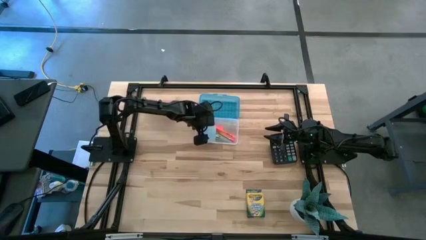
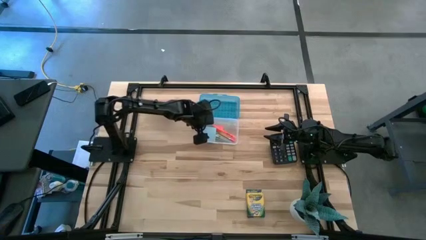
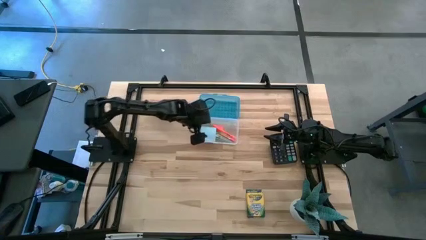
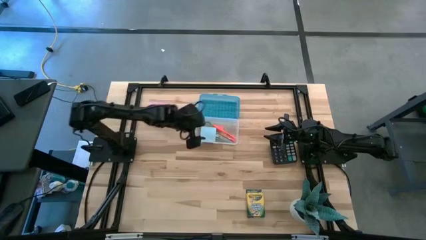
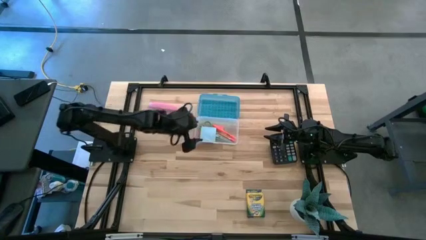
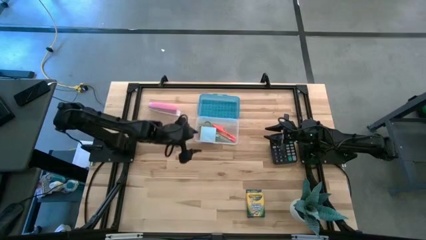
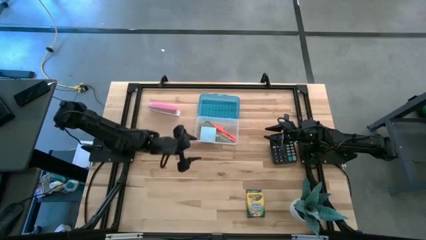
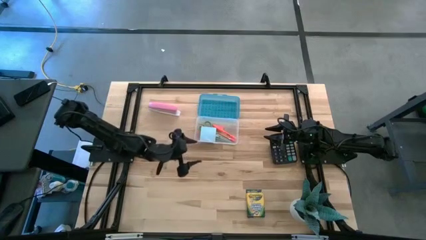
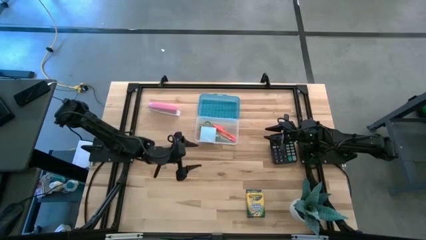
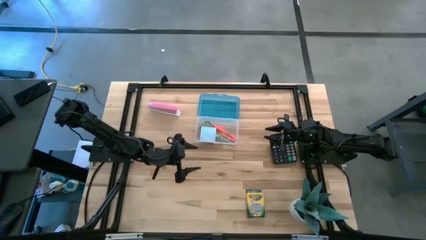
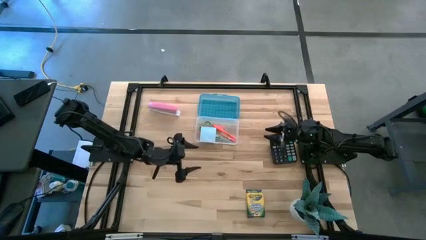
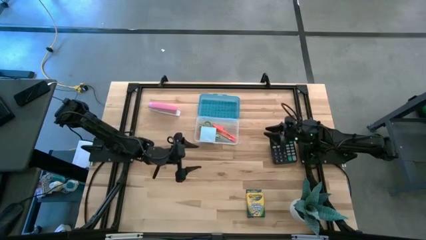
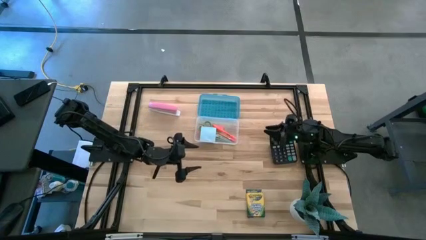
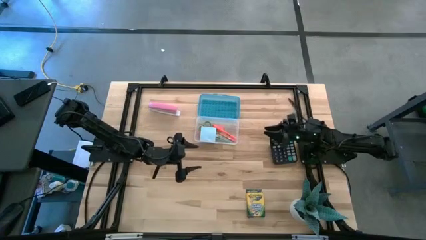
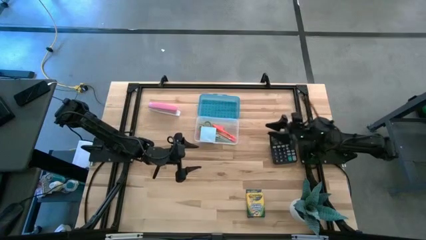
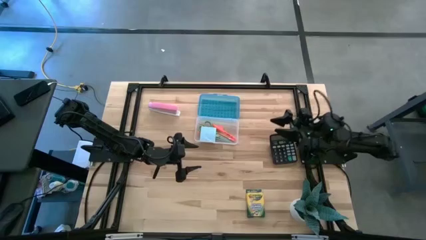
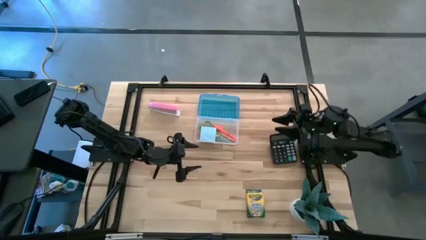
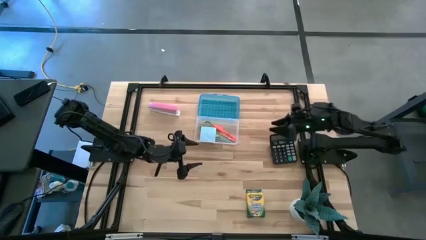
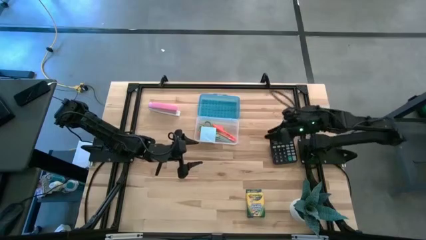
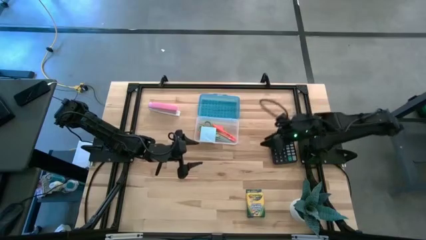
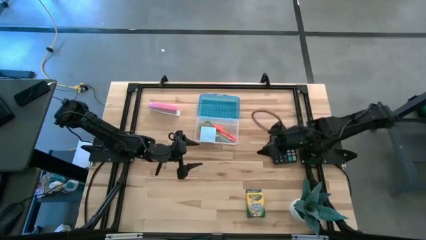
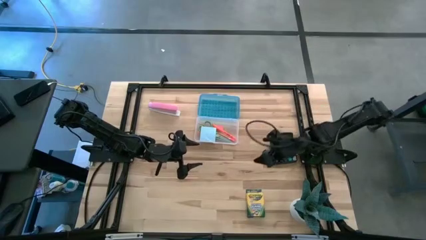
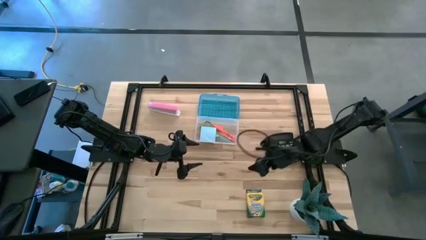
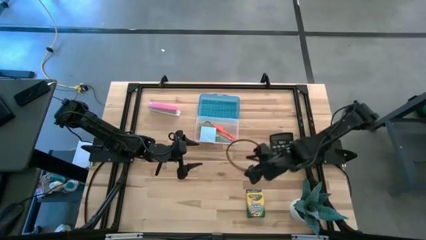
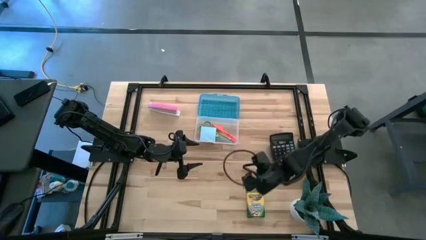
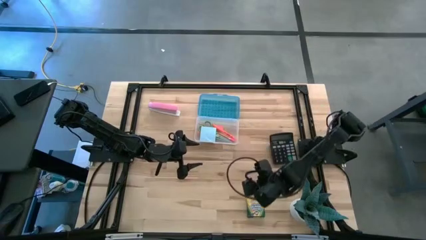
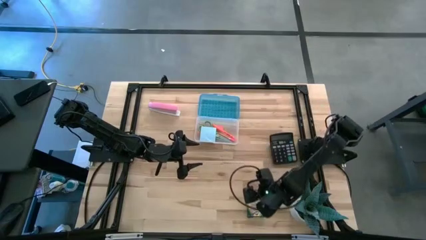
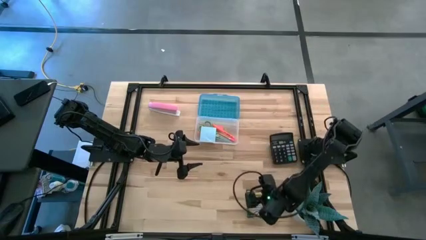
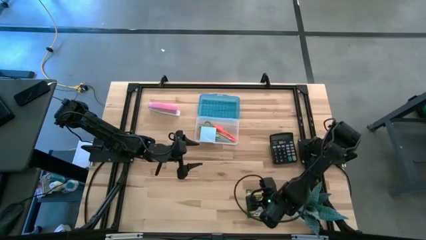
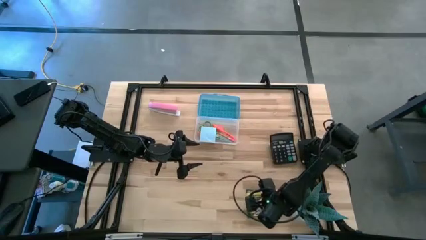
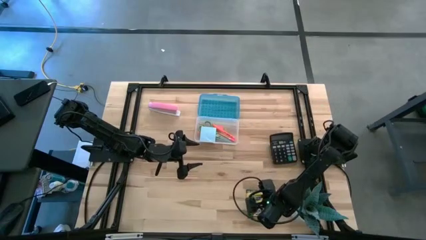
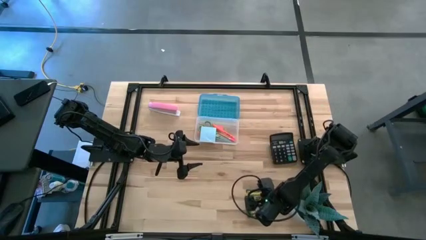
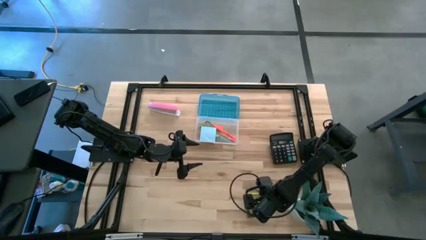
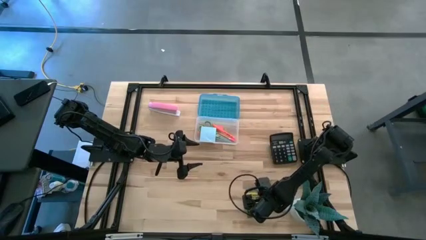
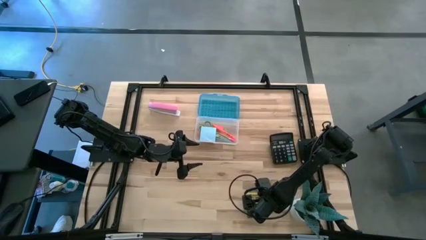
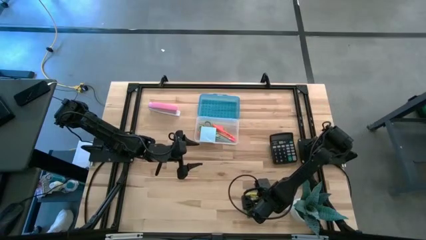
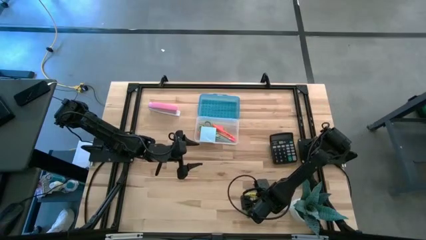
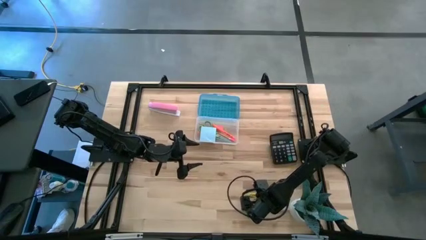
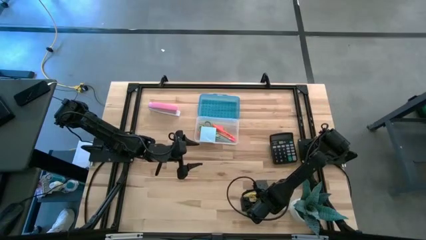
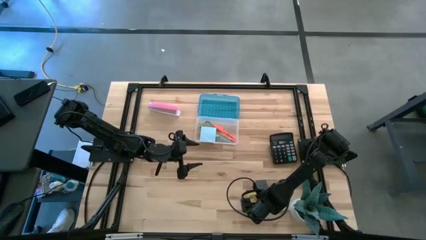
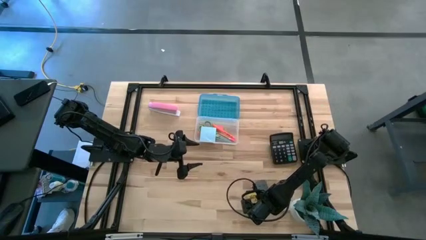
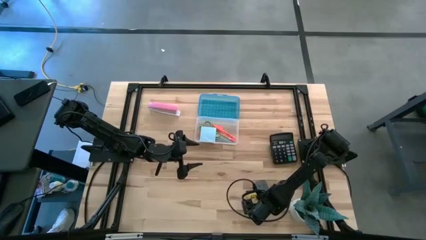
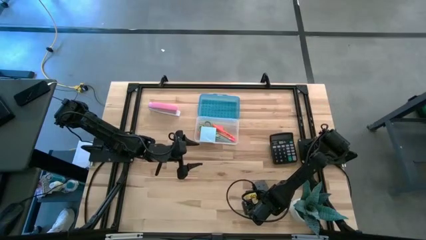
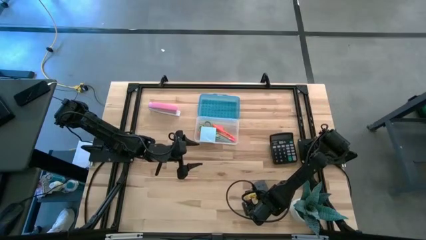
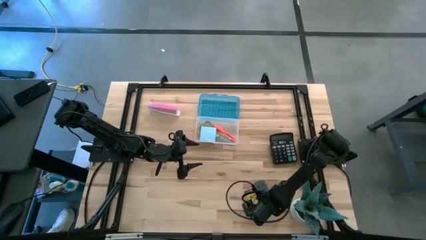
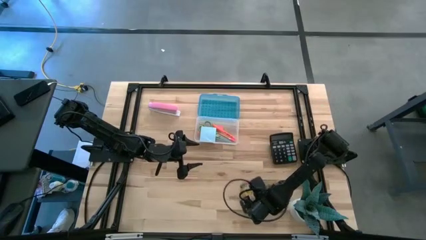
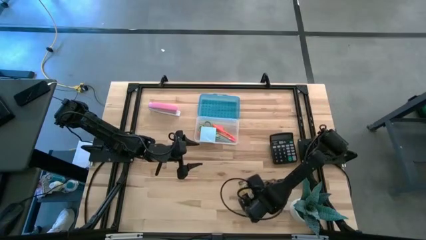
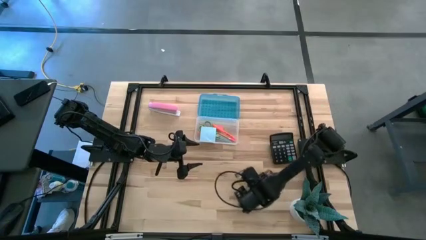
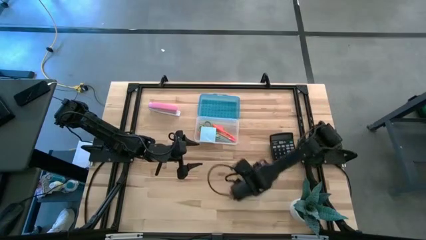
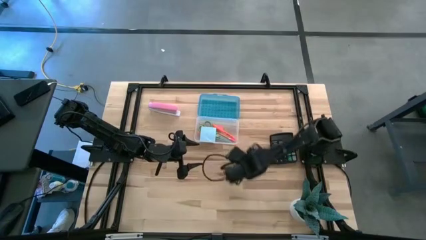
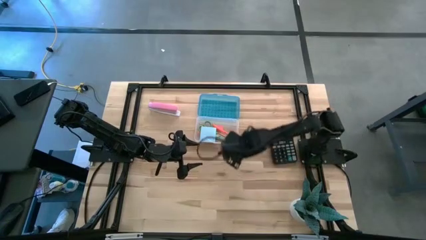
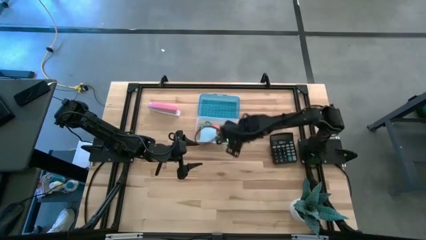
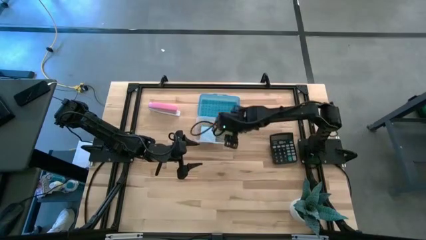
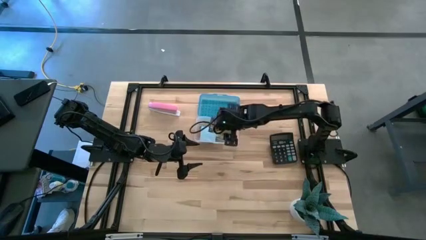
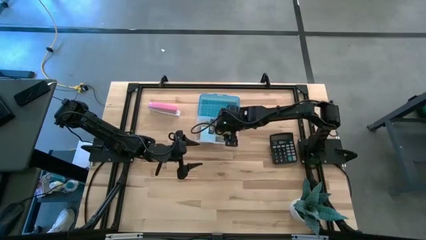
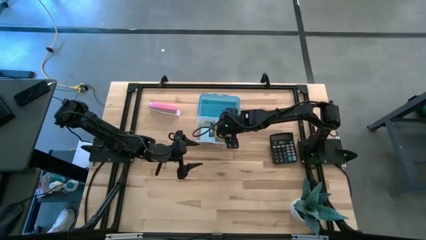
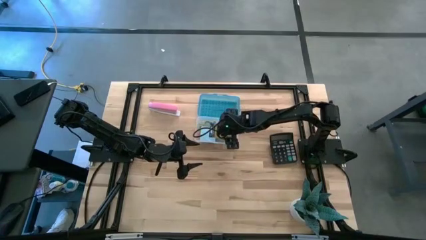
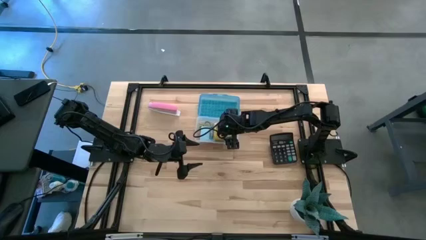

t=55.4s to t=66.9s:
Task: Pack school essentials
Put the yellow box of crayons into the blue supply box

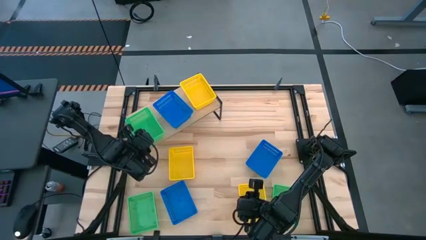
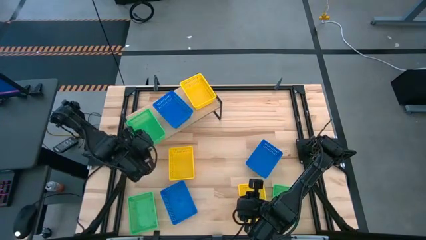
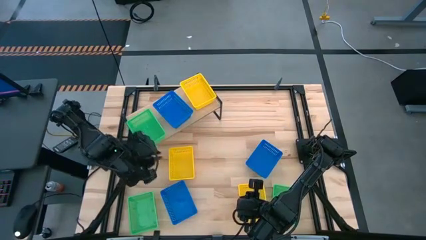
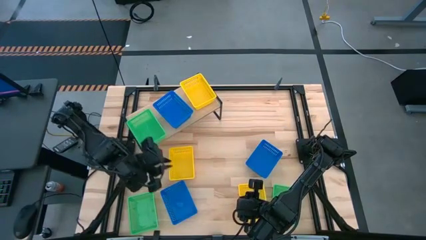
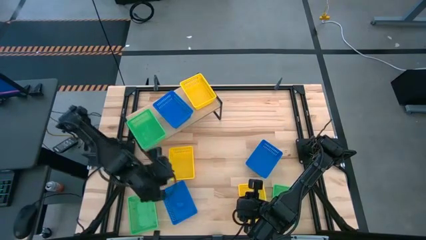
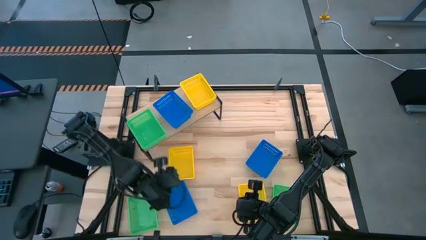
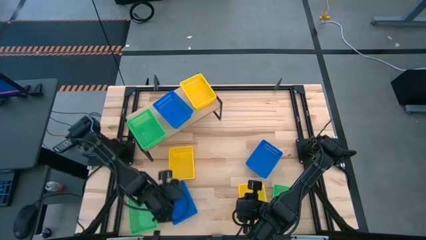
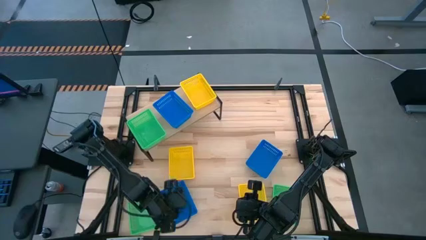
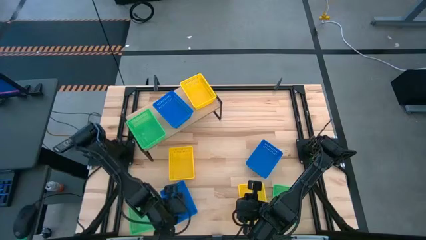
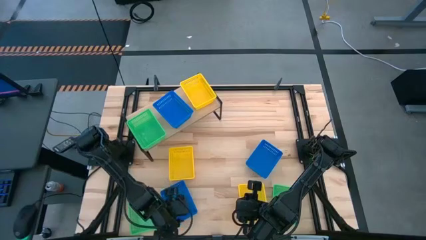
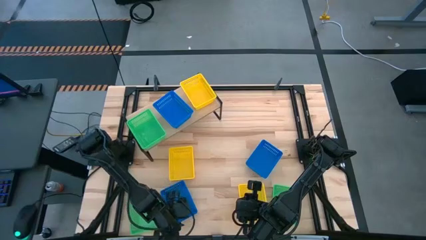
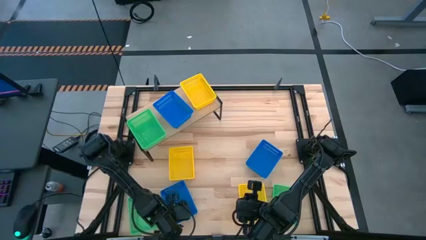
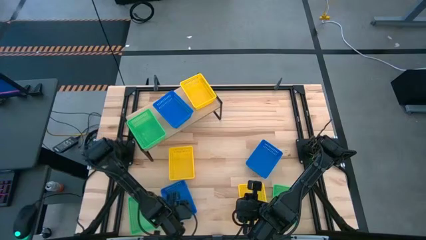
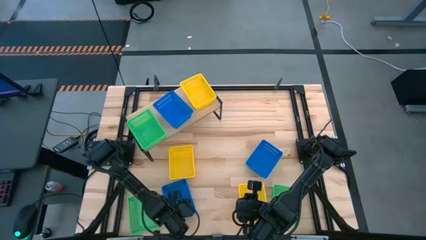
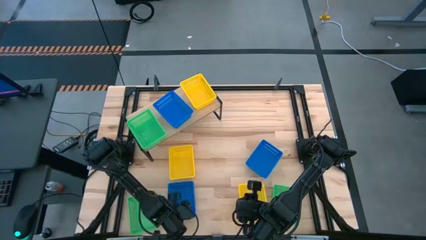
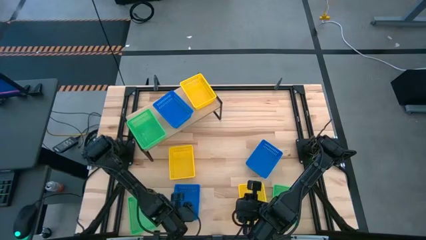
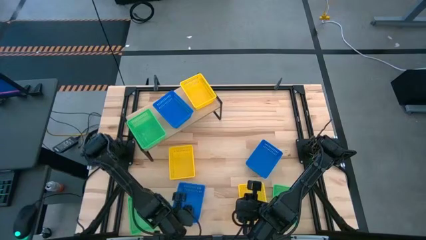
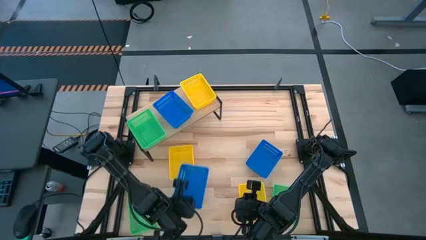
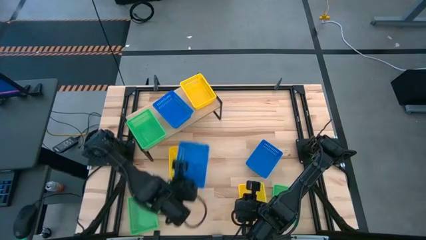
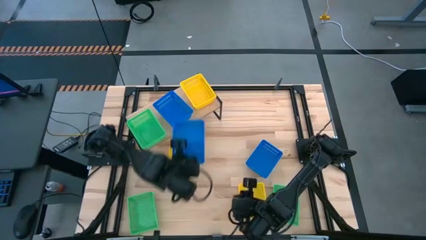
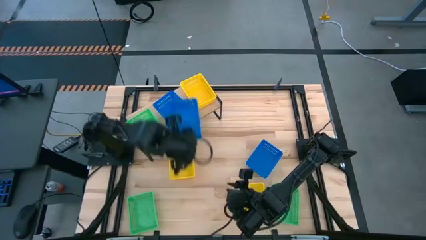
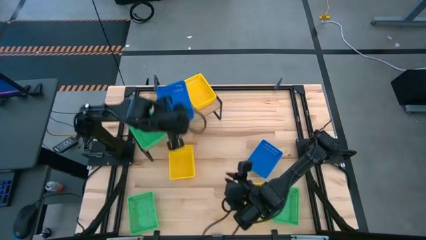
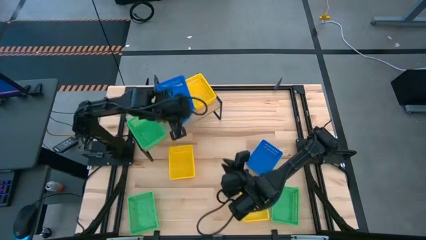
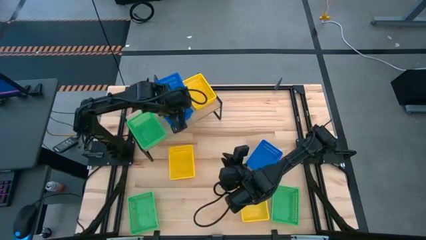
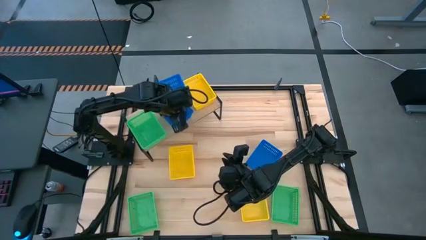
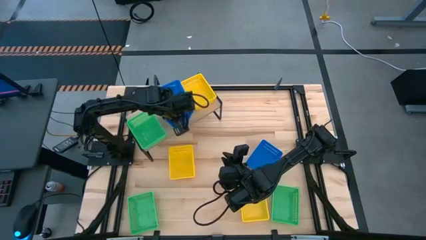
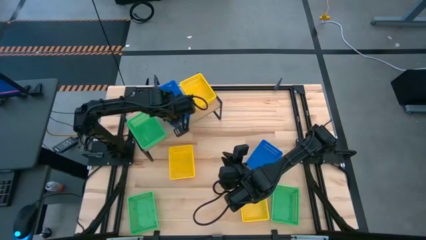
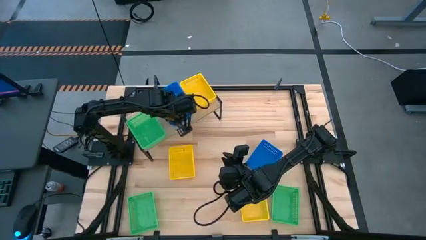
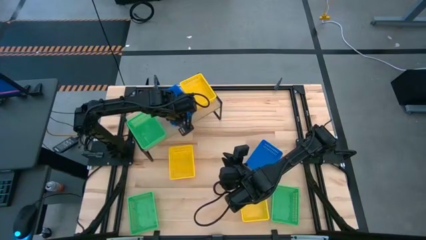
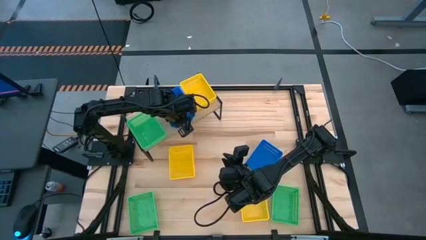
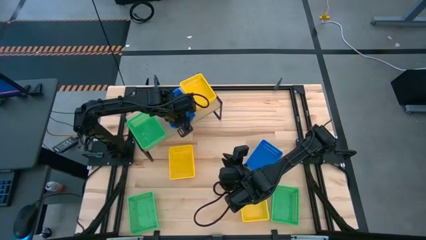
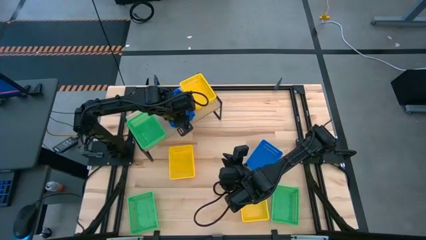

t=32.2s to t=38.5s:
Task: Stack baskets on shelf by color
Stack the bottom blue basket on top of the blue basket on the shelf
